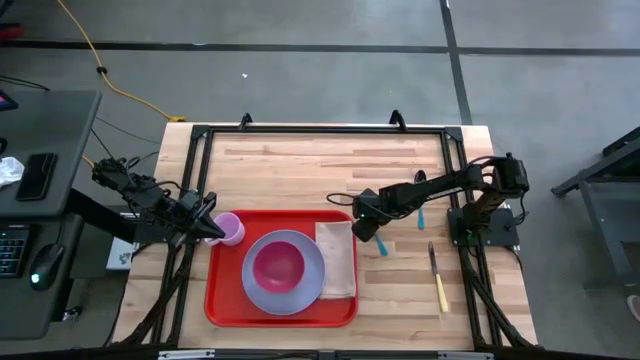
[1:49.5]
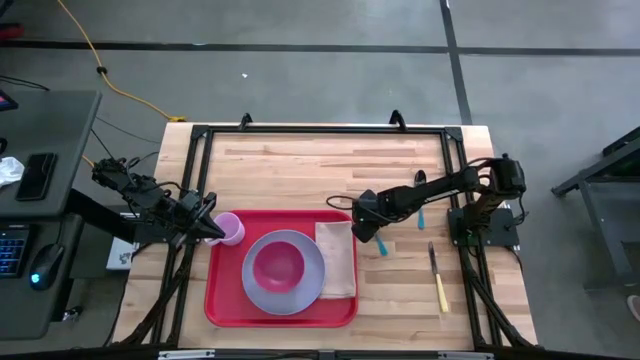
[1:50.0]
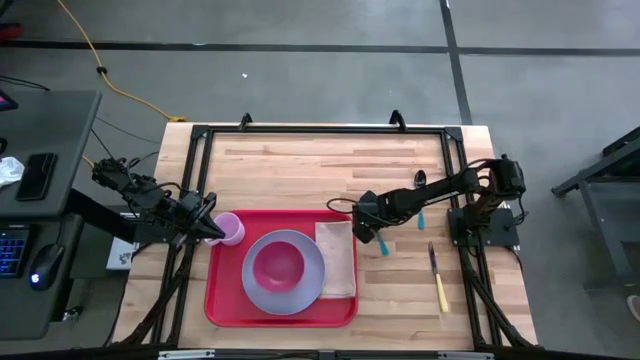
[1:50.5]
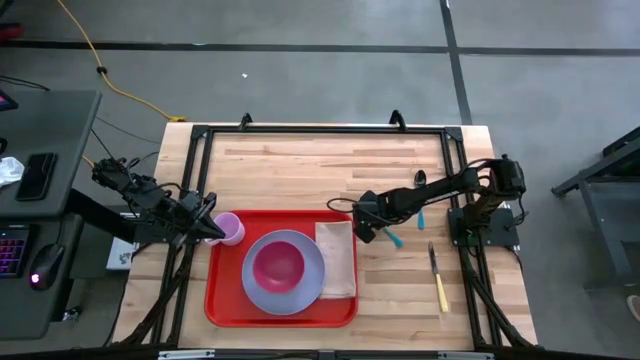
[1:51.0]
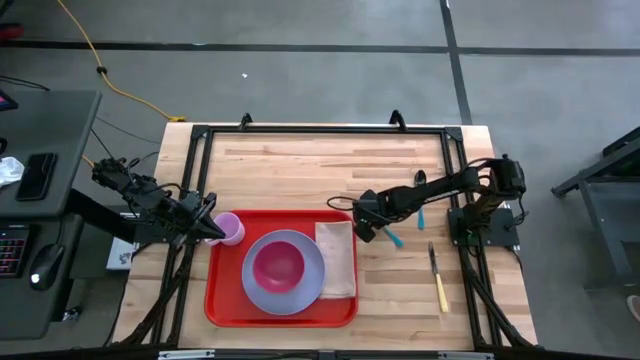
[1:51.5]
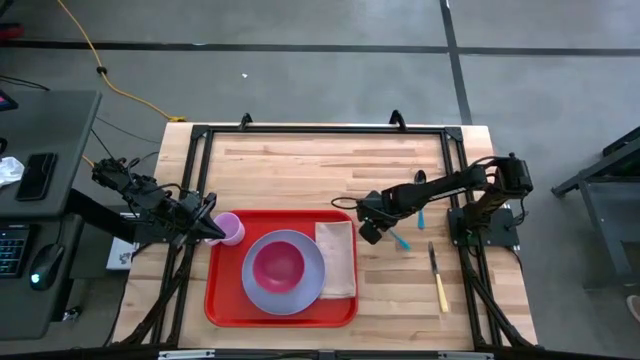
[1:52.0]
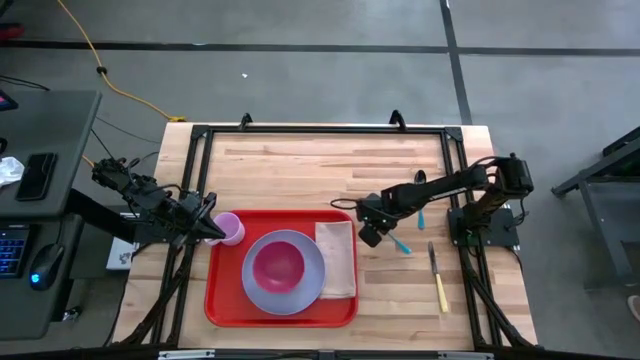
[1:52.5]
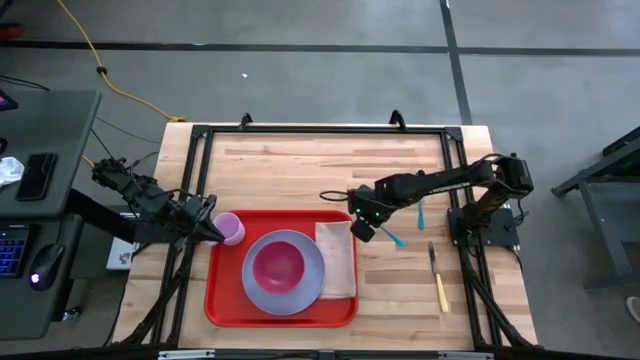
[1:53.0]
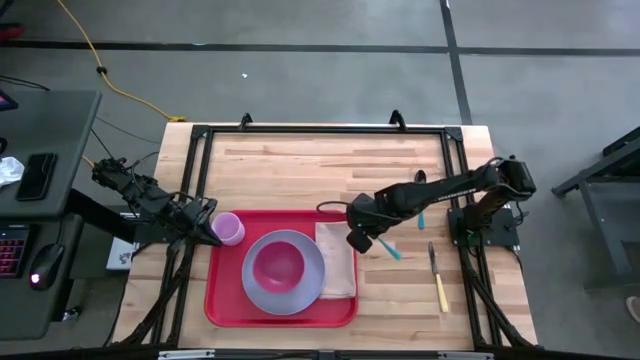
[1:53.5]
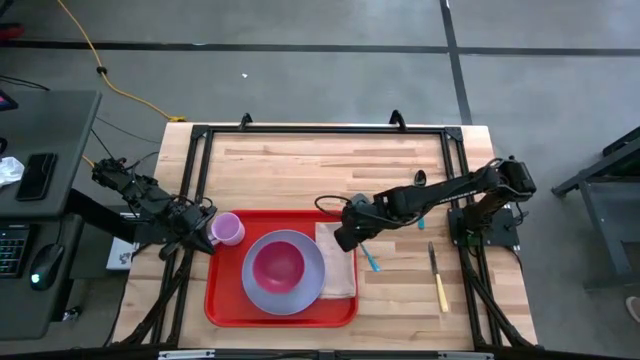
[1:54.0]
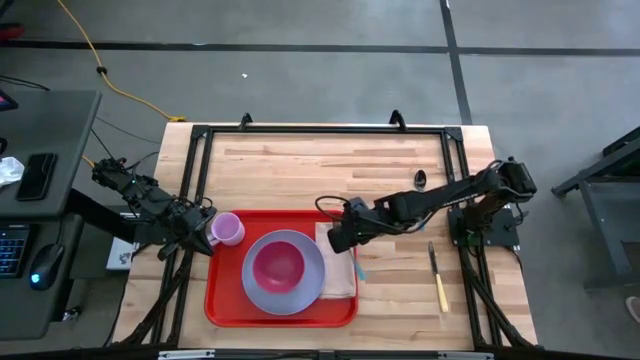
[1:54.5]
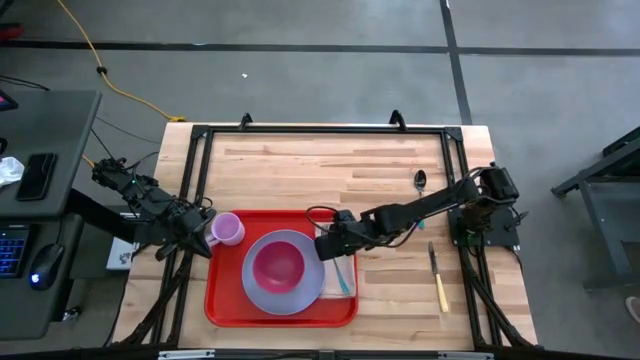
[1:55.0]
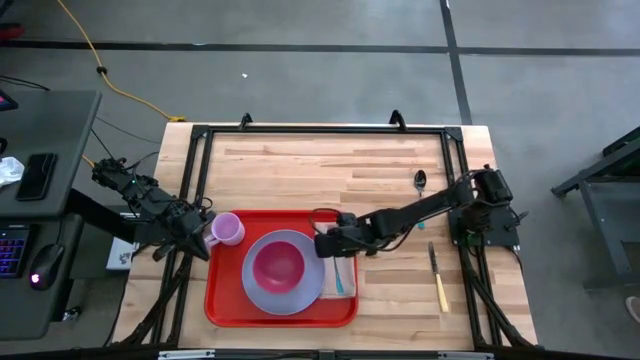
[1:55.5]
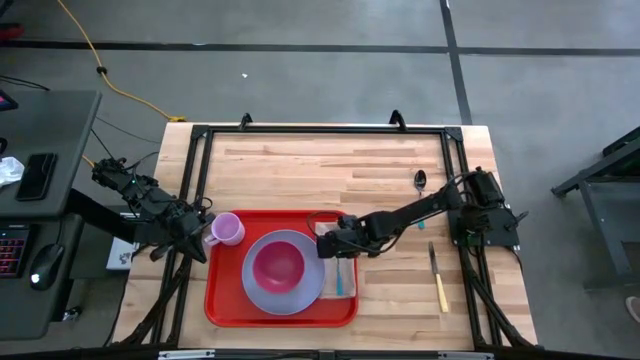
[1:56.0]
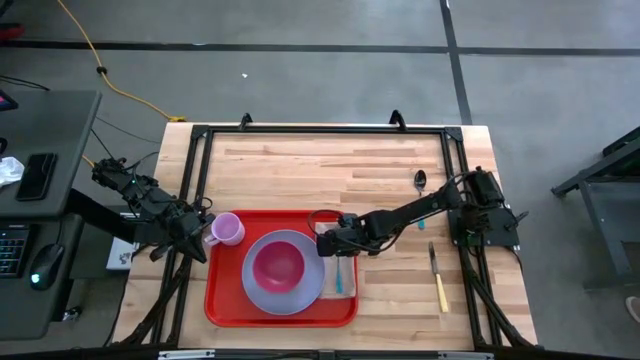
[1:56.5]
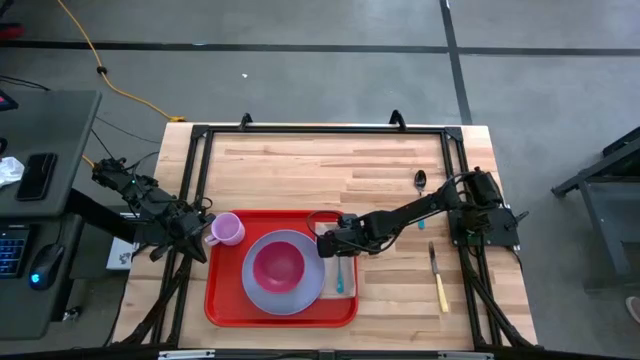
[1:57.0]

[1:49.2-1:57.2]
Task: Set up tray
Put the blue fork on top of the brown table napkin on the red tray

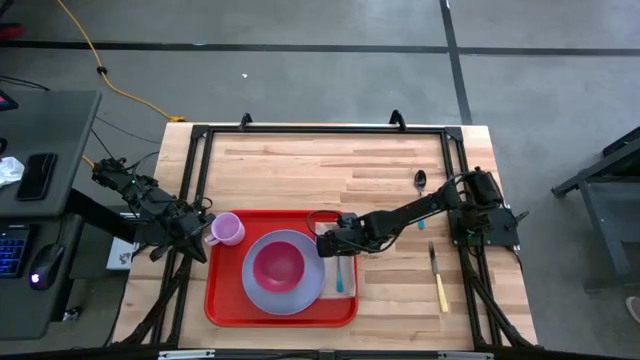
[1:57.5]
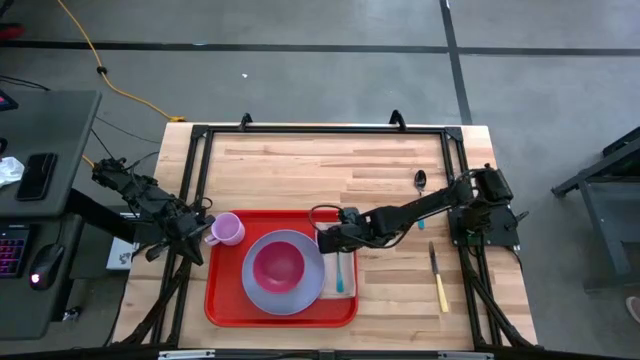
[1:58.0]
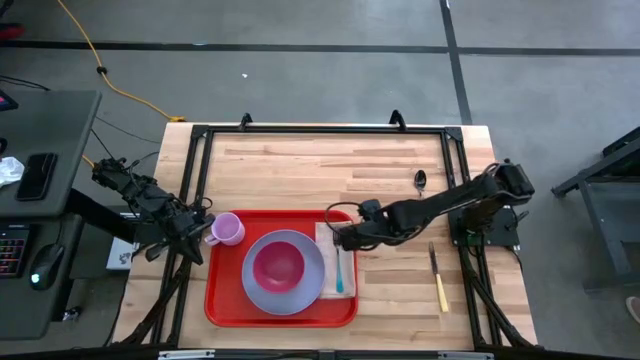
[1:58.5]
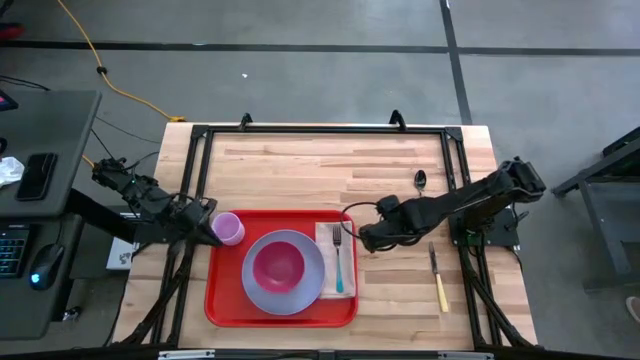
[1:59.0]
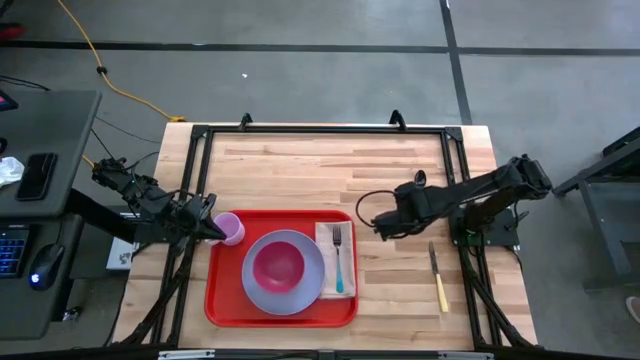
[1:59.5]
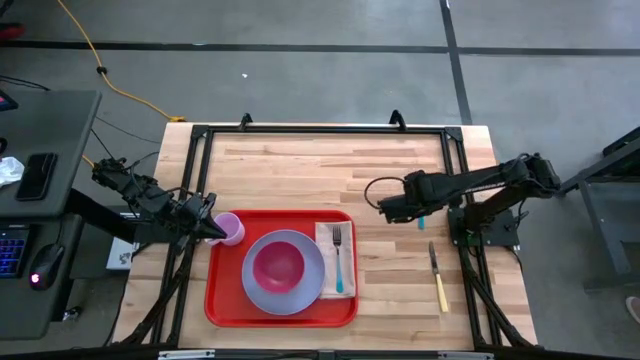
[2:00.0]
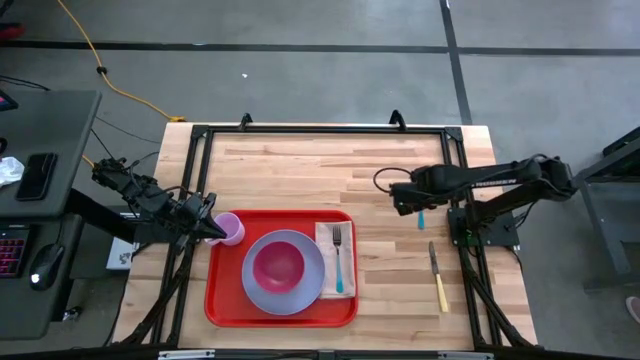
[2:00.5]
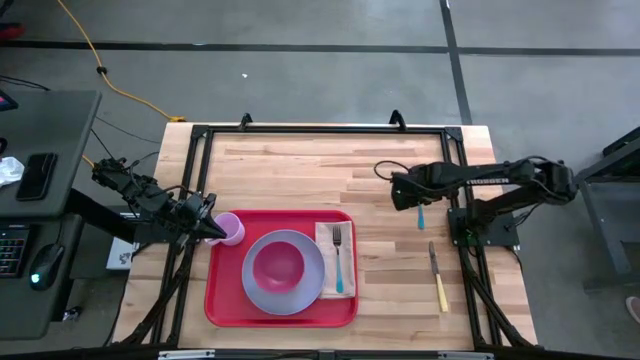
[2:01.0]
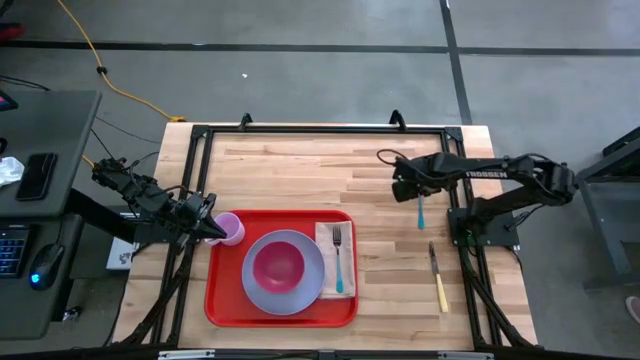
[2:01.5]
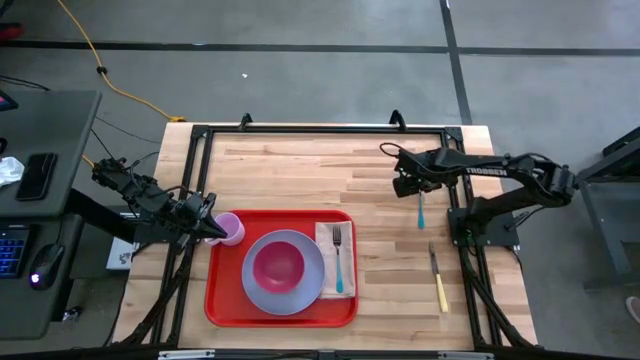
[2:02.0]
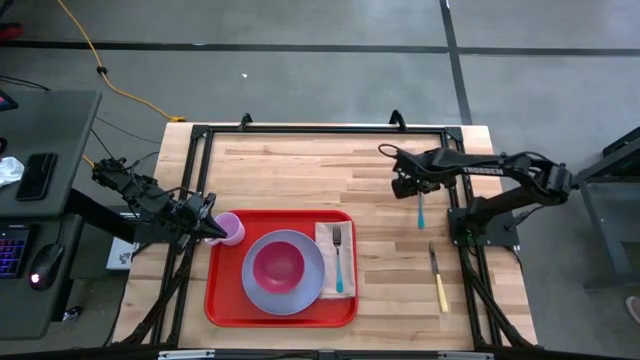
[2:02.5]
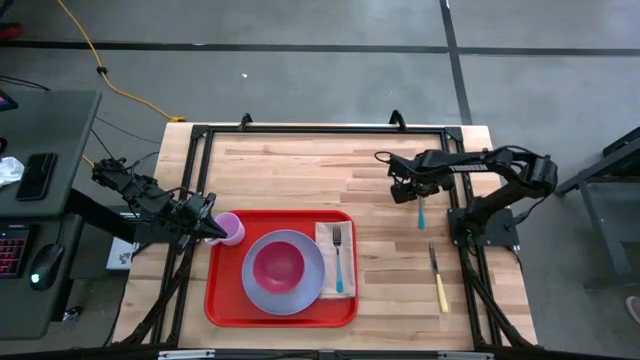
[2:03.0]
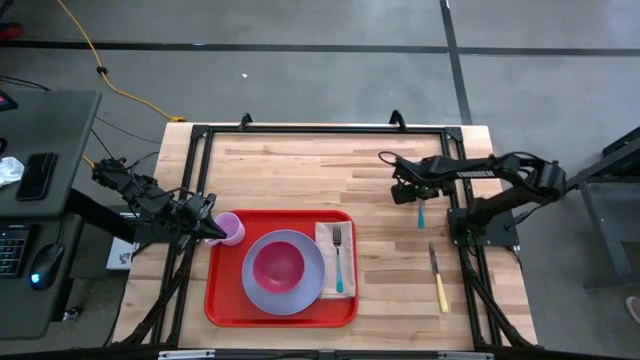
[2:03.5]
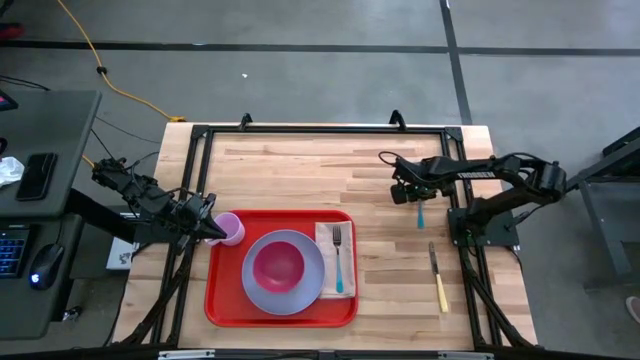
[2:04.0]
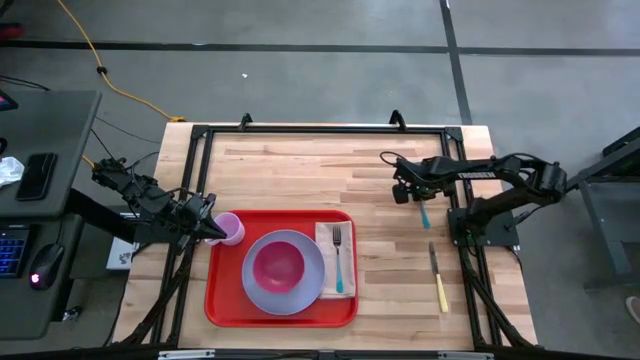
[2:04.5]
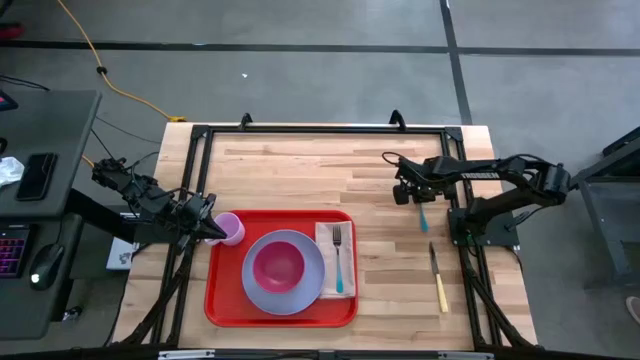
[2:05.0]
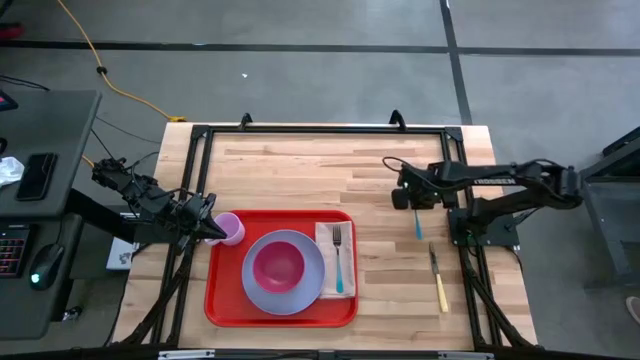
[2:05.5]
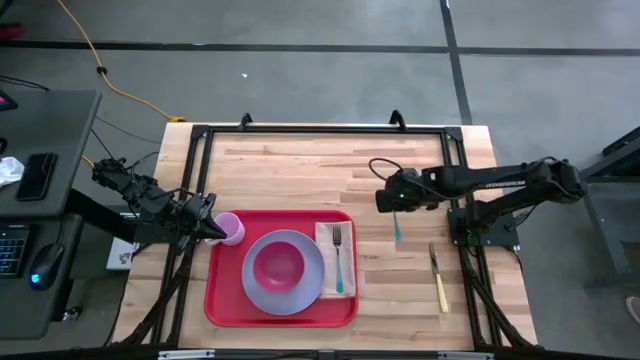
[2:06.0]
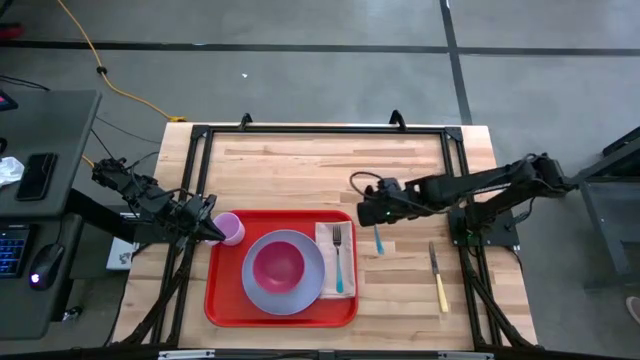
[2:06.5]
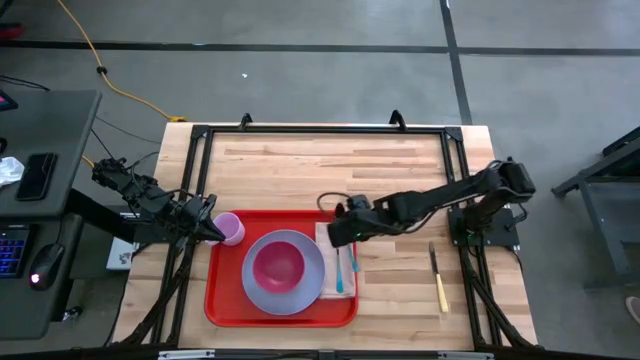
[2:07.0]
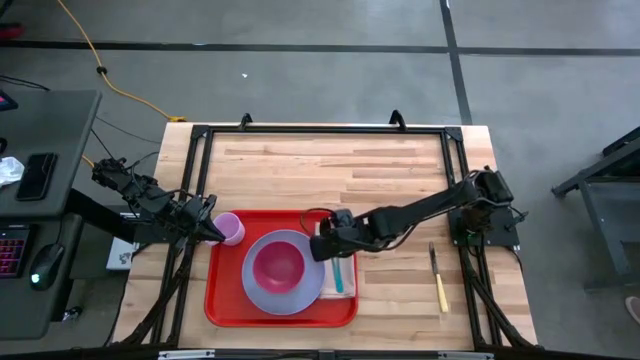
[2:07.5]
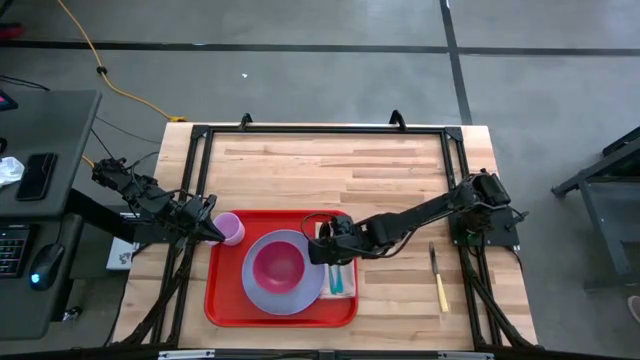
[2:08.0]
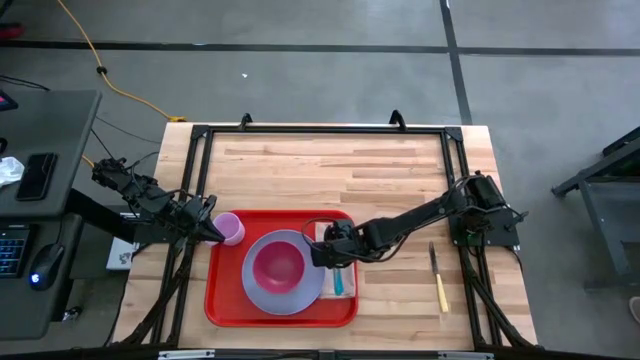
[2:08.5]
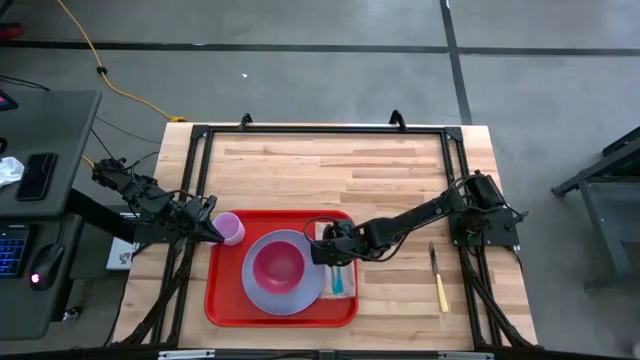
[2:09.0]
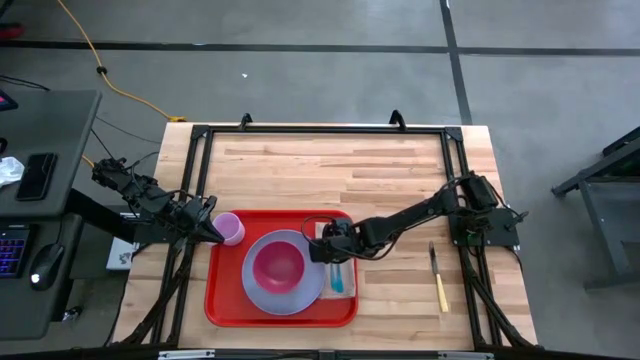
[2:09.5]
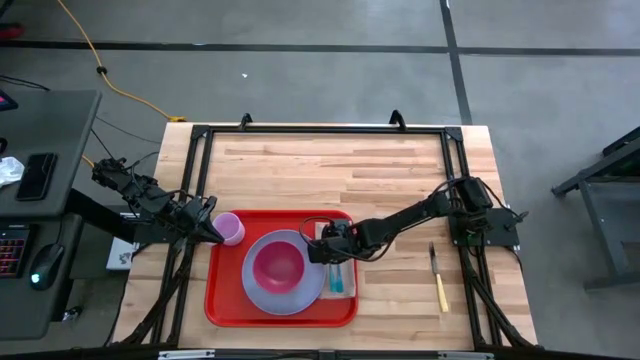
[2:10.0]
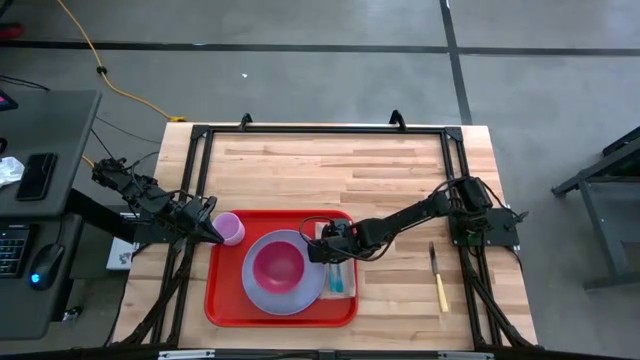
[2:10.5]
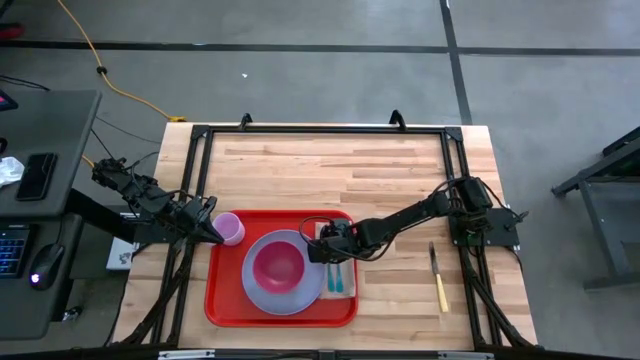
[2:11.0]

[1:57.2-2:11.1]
Put the blue spoon to left of the blue fork on the red tray
